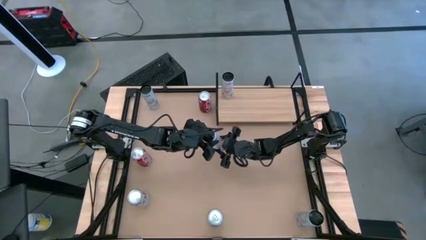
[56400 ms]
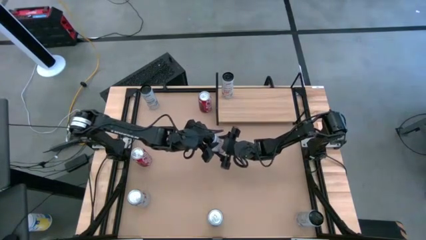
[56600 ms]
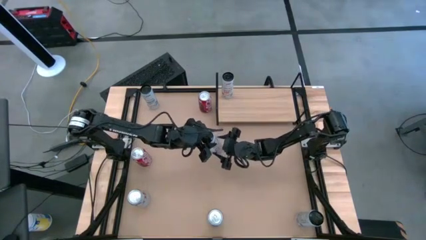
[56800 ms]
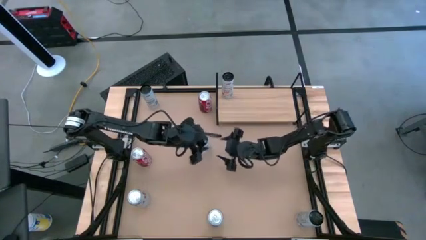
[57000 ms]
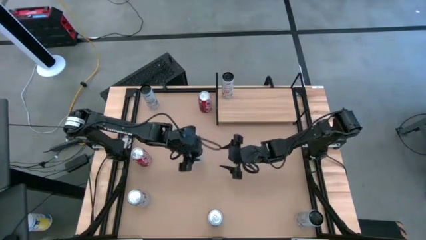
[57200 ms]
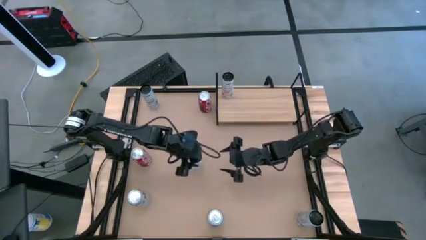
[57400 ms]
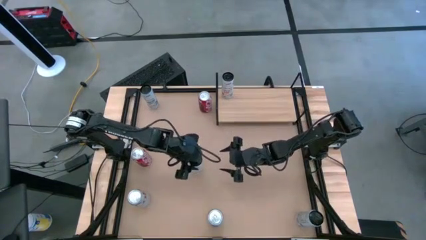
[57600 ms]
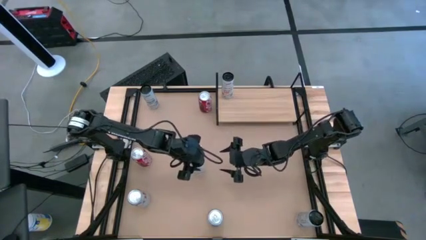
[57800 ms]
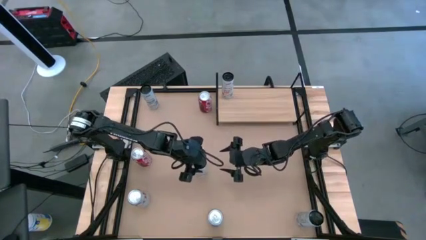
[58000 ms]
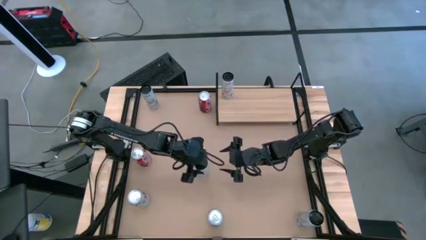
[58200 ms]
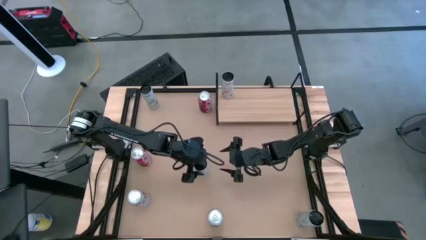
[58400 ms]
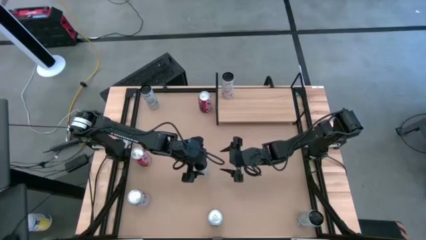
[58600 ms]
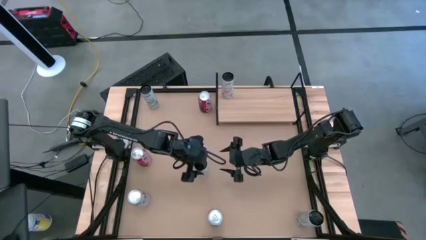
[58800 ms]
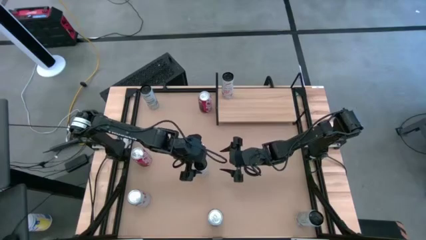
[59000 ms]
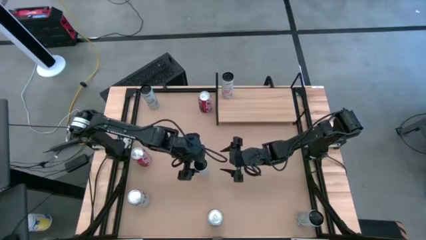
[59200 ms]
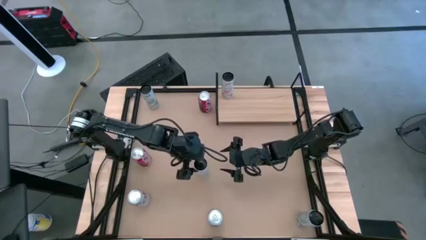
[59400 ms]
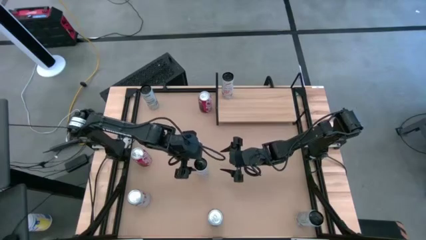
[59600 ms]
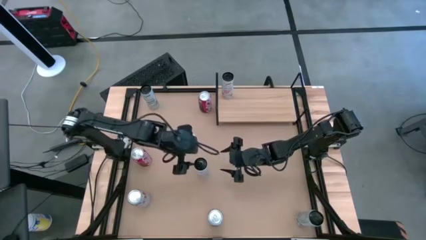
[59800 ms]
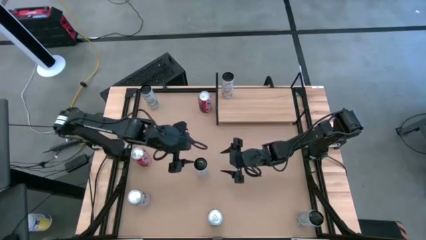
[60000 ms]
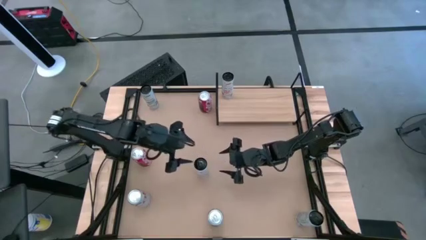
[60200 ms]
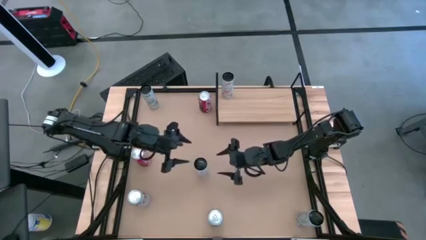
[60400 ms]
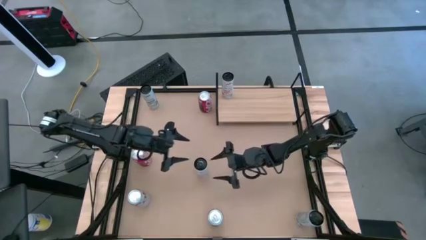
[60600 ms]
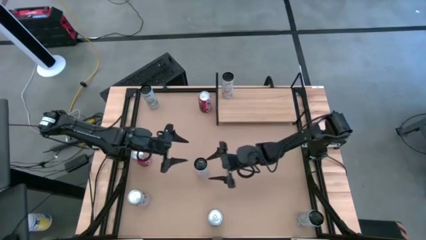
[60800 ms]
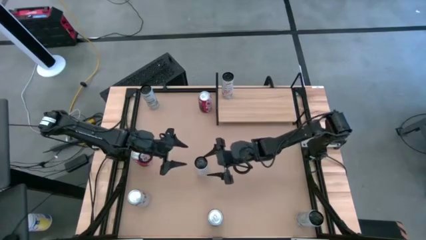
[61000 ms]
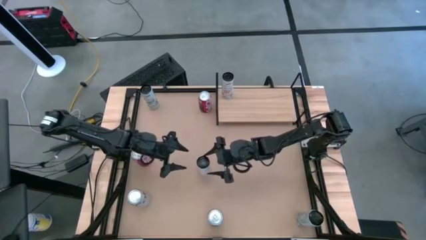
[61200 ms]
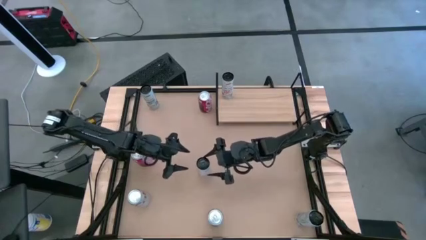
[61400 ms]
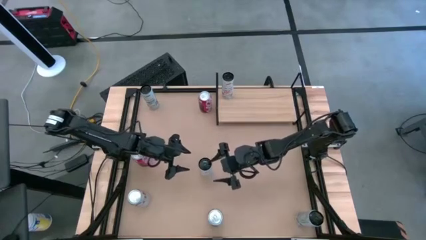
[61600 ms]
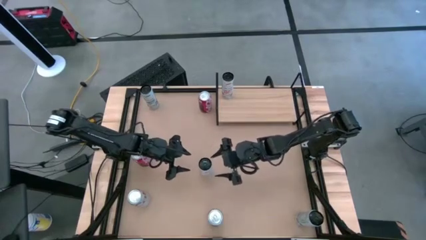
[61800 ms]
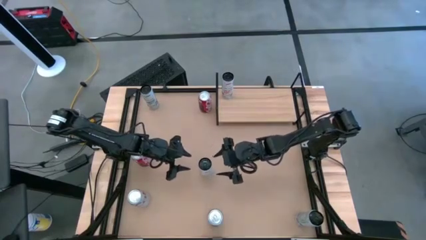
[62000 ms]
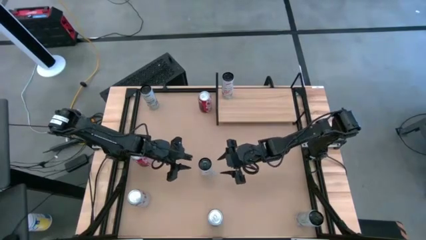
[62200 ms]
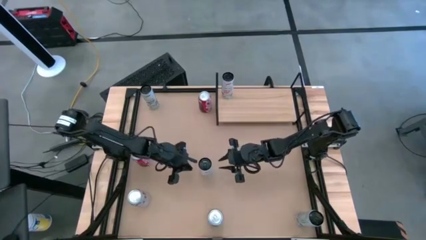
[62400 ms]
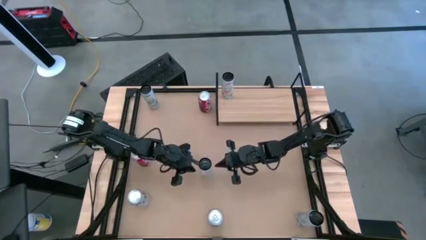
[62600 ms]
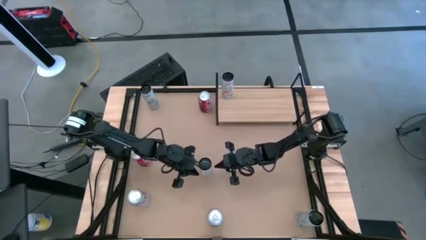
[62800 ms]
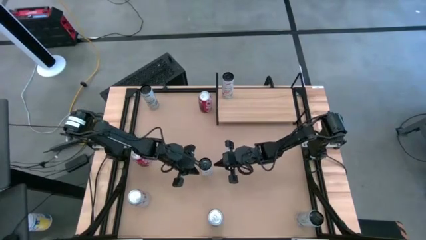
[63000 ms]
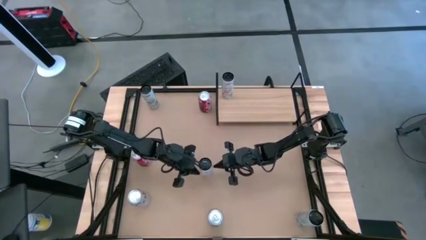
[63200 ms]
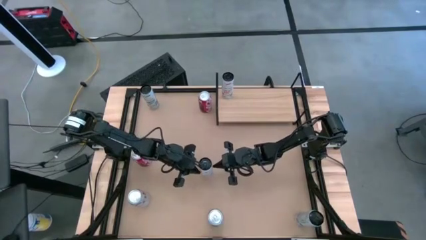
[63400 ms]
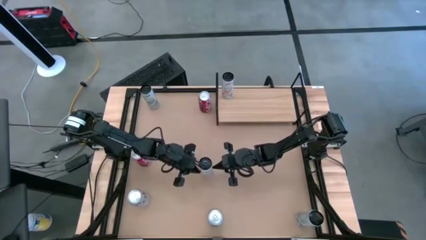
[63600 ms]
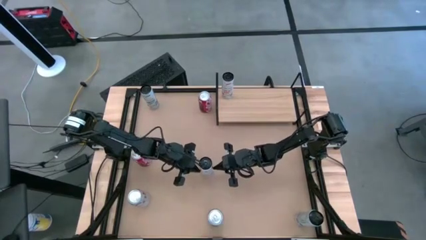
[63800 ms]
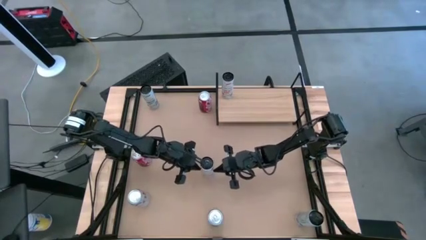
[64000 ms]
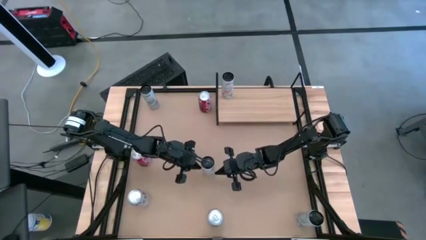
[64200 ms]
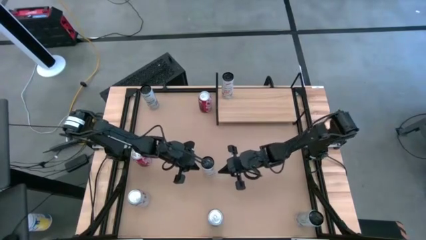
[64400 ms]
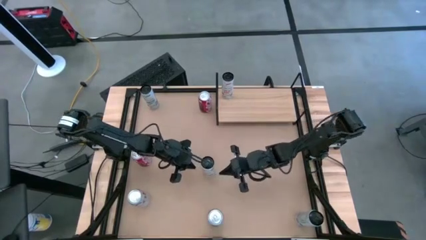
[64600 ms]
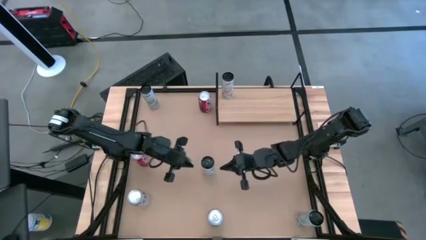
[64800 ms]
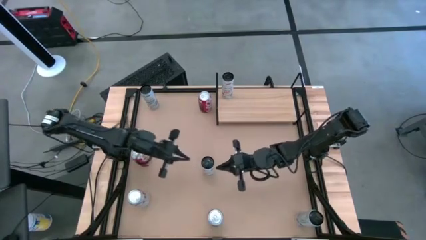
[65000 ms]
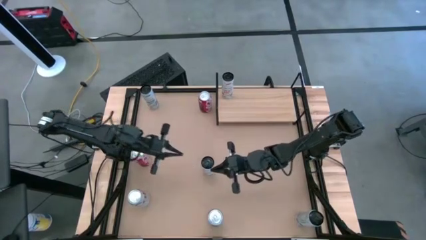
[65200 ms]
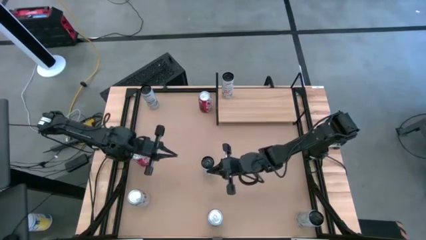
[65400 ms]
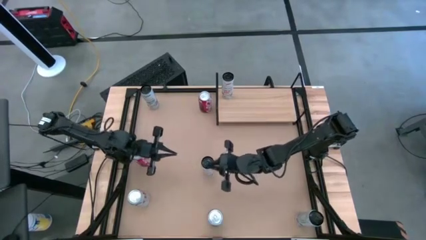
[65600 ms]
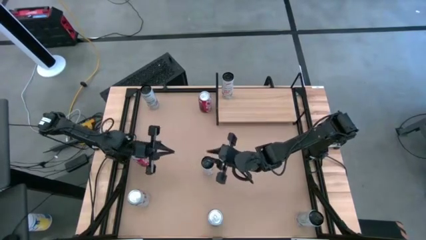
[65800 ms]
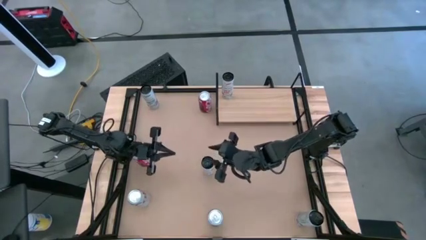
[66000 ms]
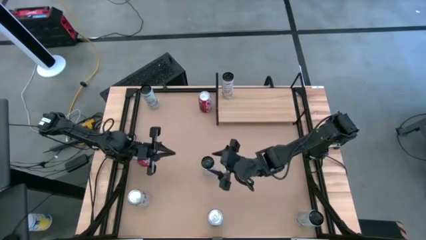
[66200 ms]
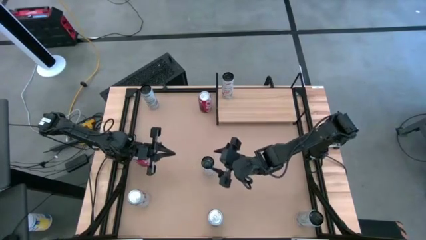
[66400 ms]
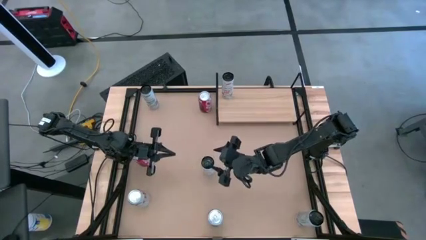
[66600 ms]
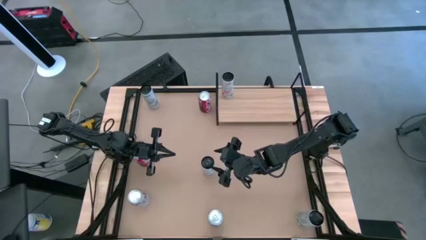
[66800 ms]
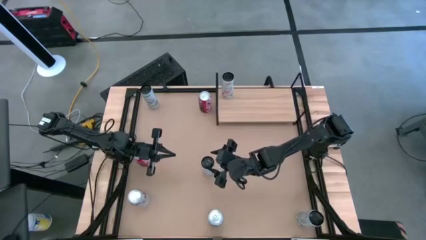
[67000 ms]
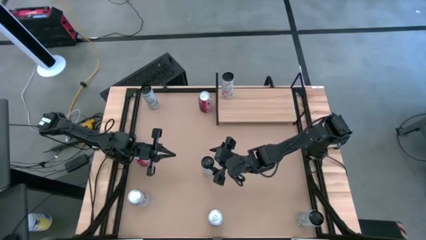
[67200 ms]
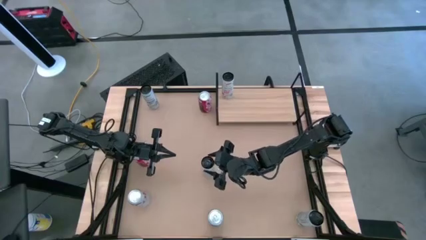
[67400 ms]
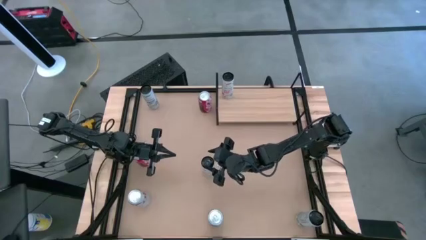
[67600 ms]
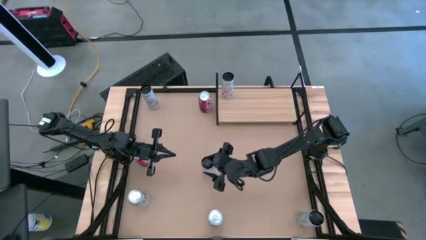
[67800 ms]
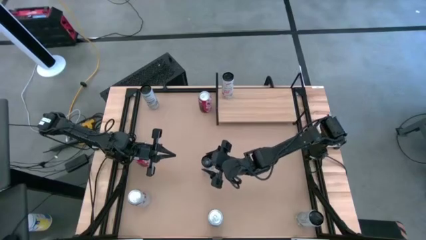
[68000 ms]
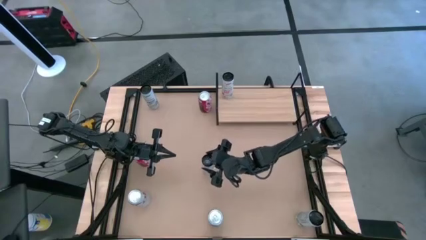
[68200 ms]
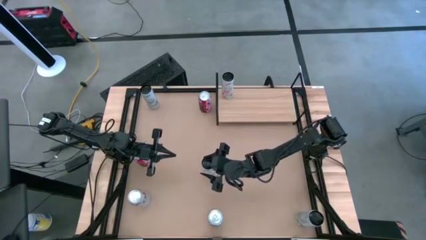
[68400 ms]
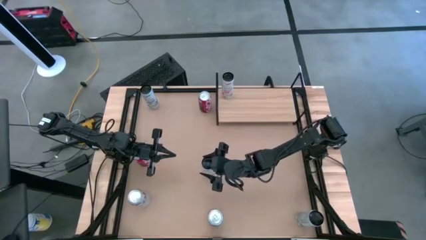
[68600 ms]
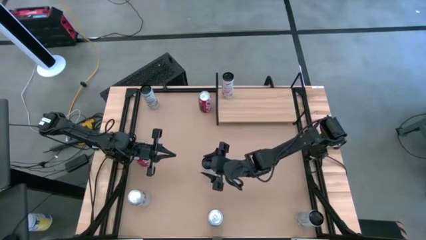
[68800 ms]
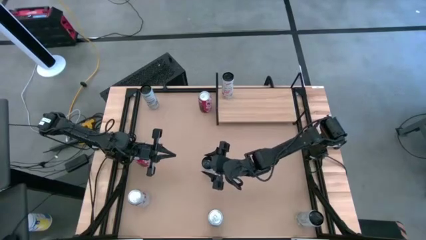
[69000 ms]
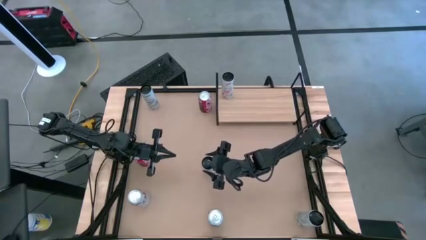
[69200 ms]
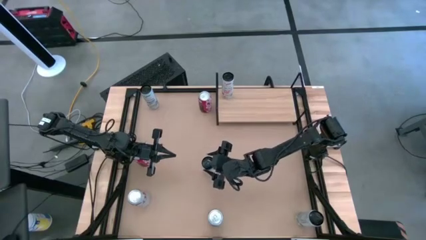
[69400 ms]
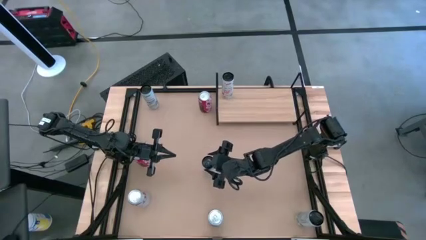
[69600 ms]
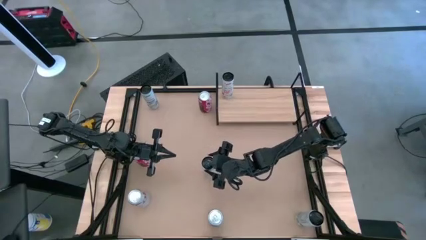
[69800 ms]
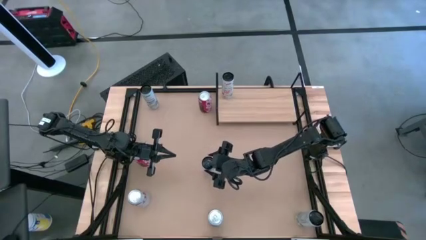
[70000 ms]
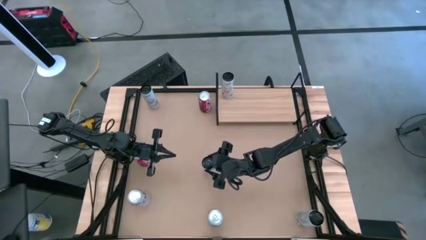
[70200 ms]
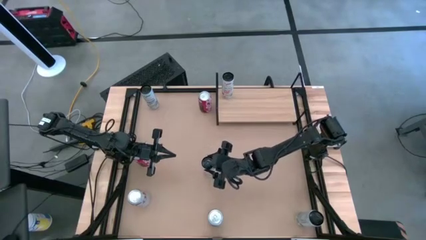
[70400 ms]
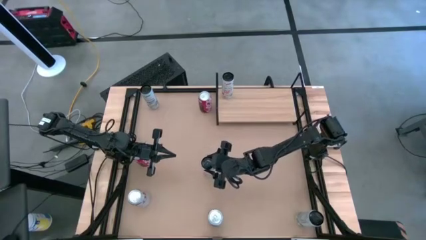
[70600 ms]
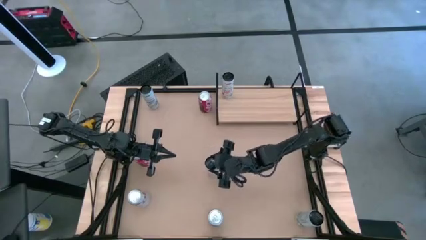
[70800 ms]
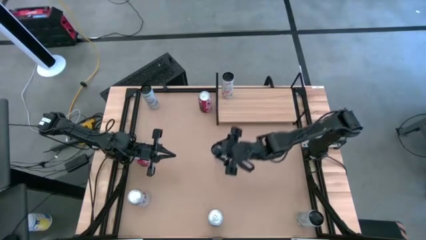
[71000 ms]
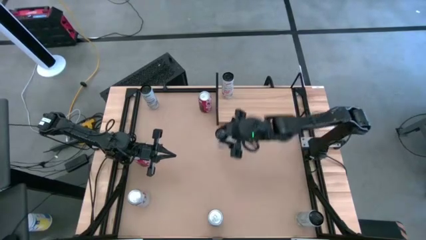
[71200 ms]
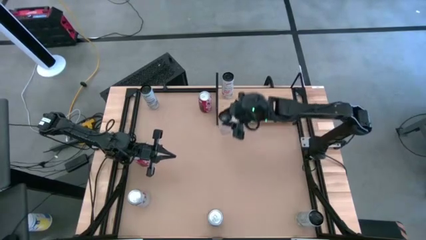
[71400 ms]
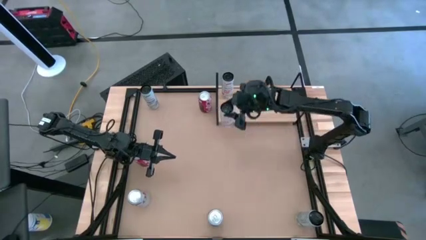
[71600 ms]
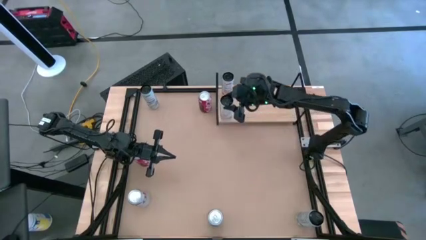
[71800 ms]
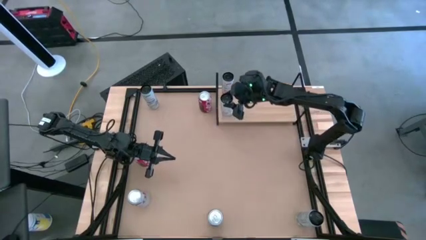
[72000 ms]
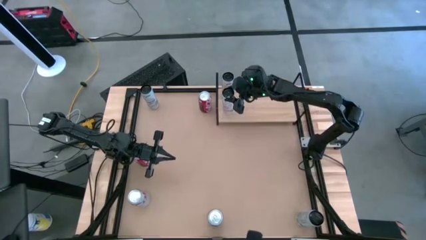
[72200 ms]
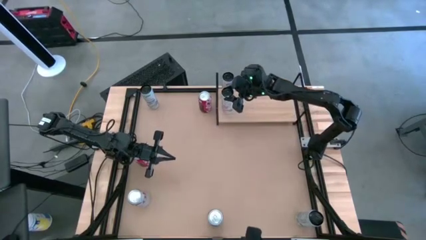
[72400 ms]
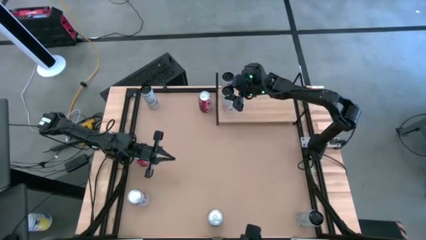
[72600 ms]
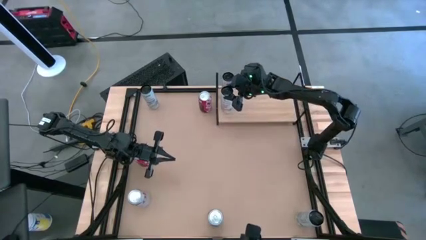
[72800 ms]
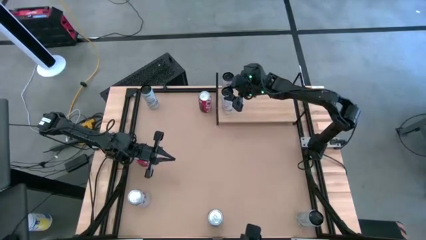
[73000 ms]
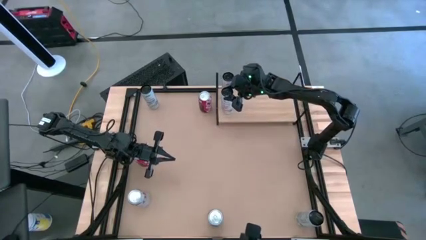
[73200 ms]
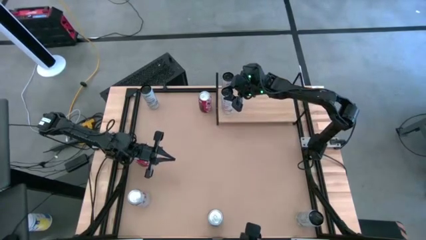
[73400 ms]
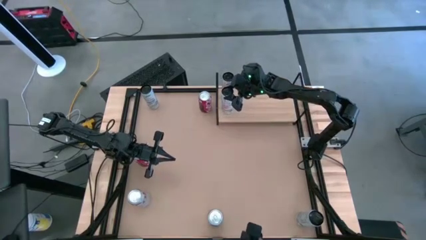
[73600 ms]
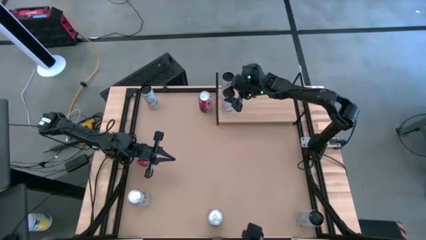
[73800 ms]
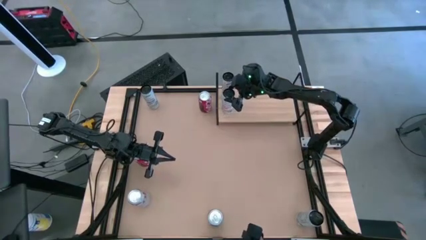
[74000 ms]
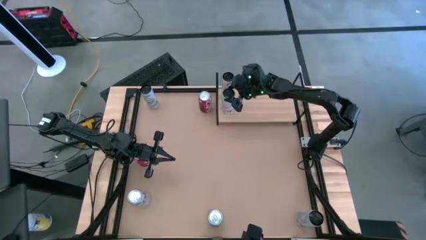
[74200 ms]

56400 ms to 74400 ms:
Task: Place canned beverage on shelf
Put the white-pink soda can on the shelf align with the other white-pink soda can
